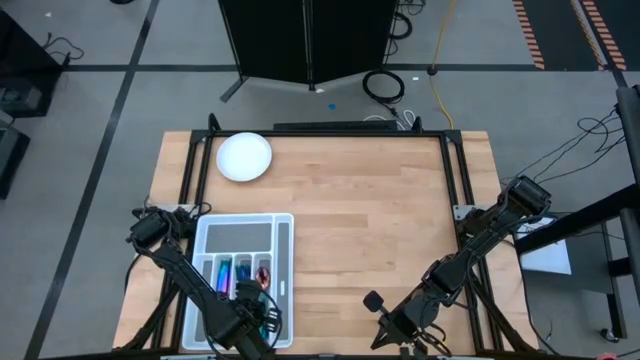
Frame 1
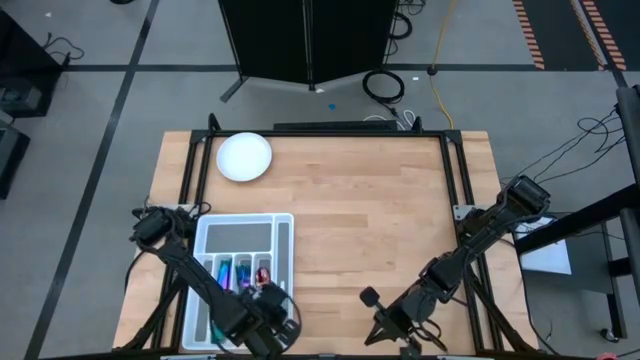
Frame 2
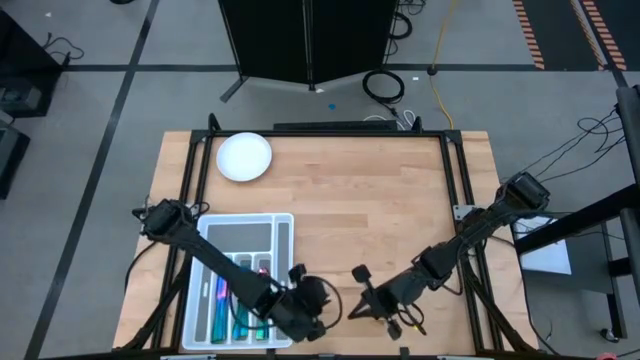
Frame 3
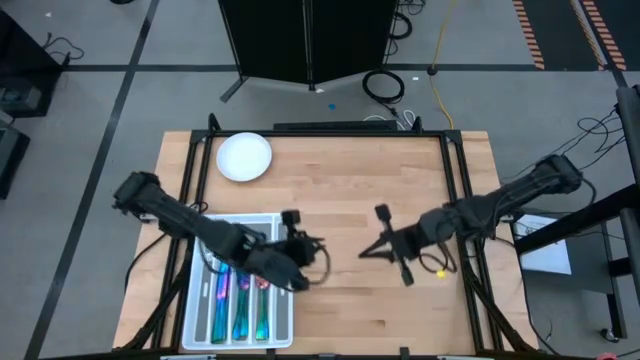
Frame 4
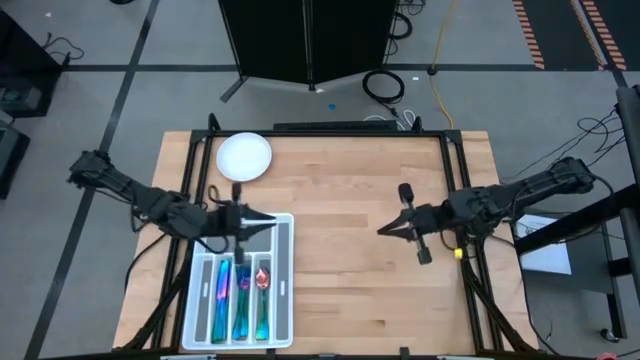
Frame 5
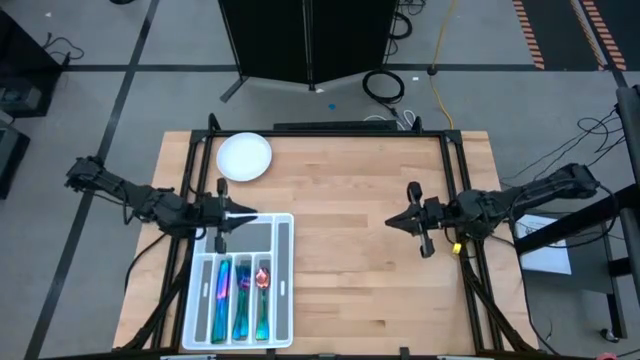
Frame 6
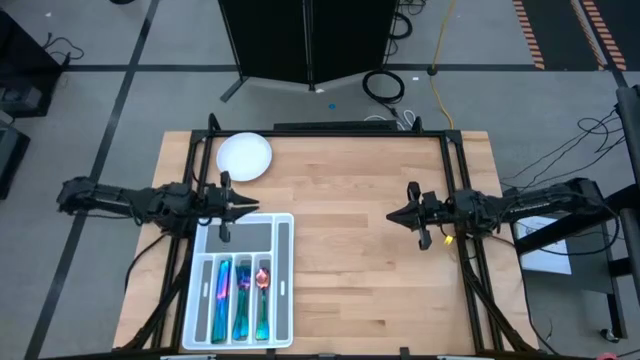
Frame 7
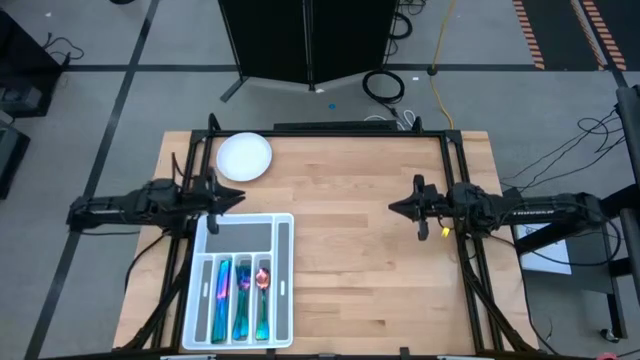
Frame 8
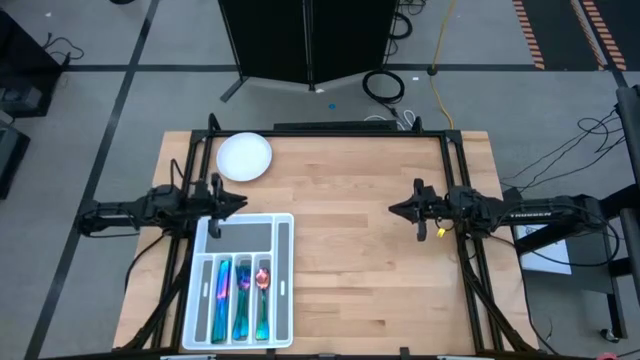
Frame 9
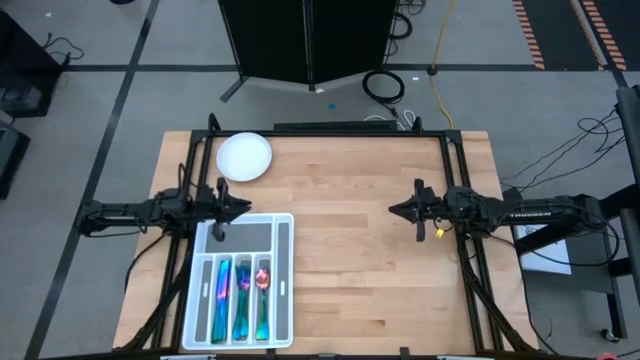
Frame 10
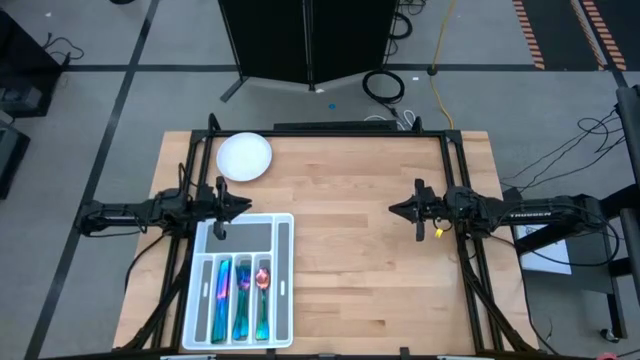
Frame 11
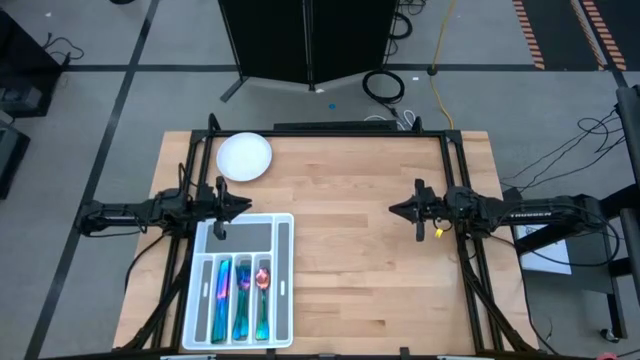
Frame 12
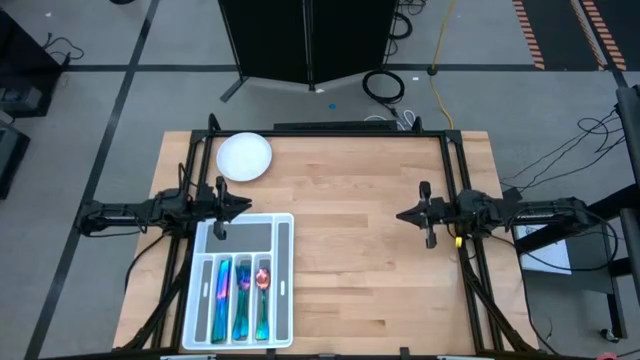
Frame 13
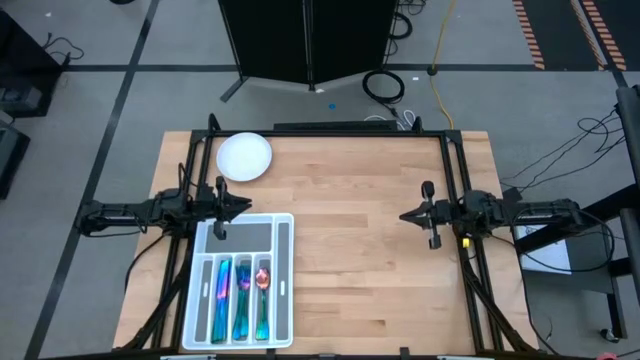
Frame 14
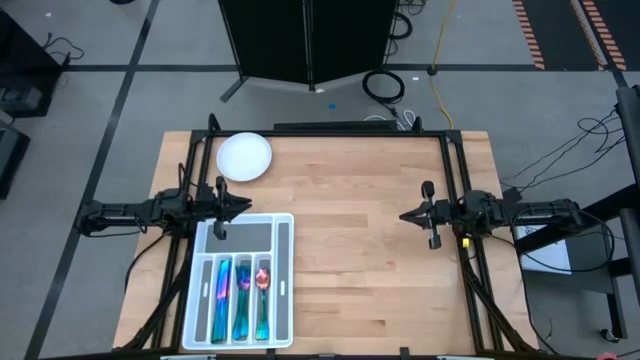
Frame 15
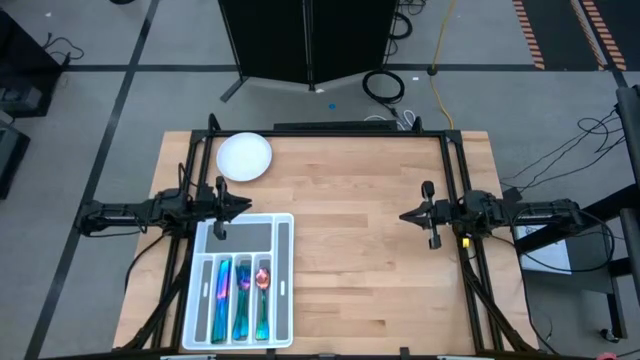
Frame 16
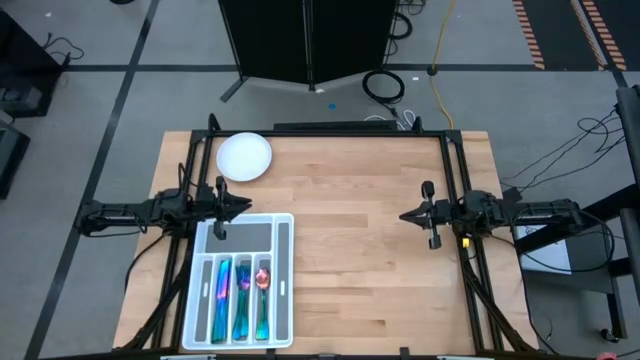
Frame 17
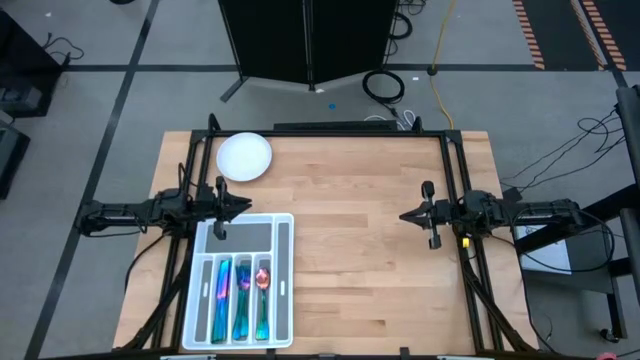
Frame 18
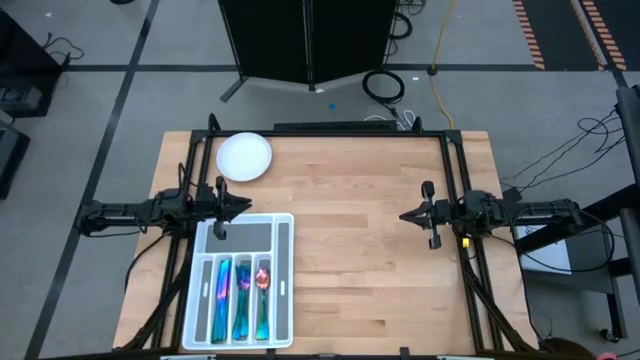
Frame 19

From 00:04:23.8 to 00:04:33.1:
Task: Sort silverware
Return to Home Position

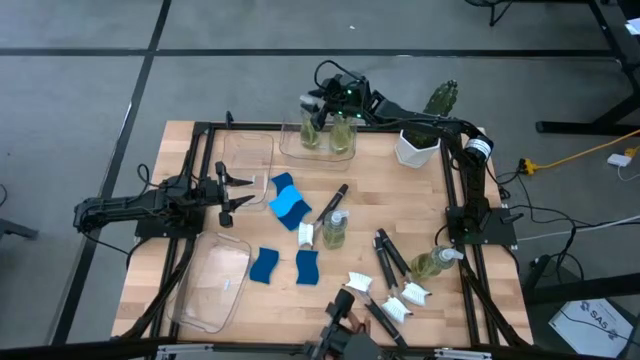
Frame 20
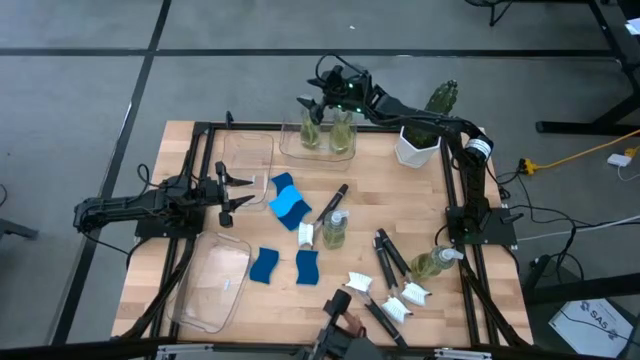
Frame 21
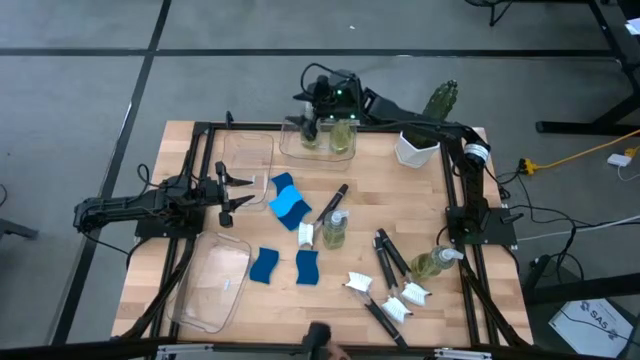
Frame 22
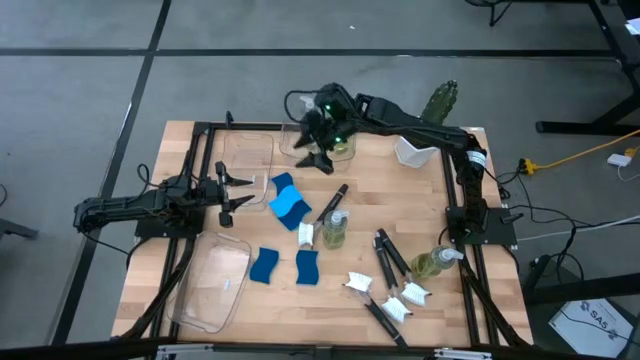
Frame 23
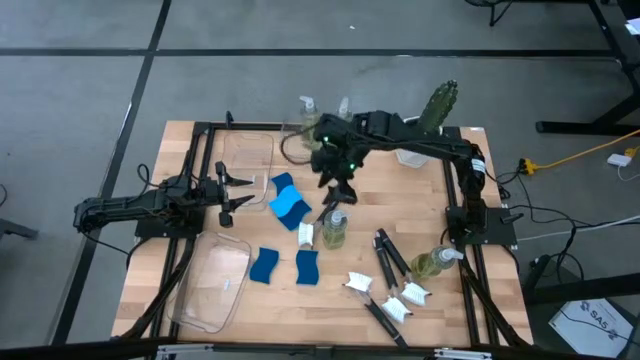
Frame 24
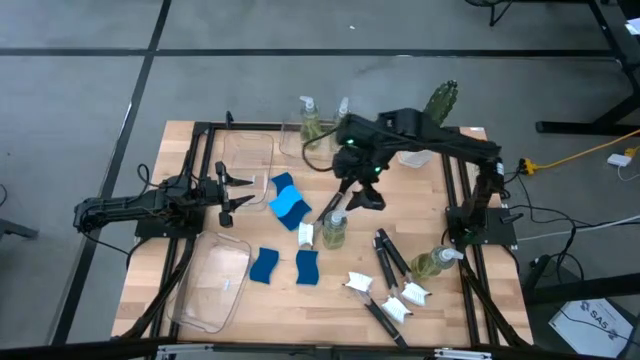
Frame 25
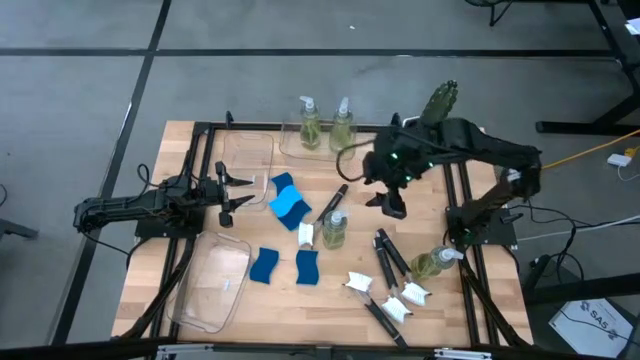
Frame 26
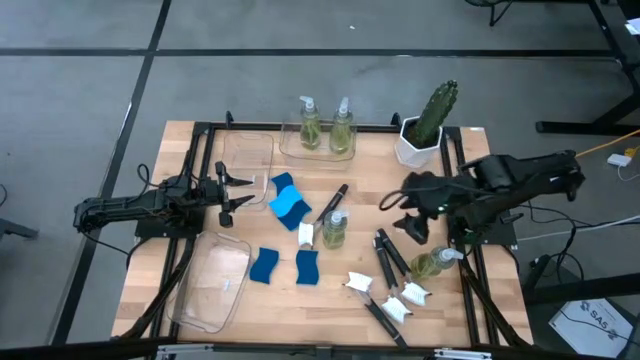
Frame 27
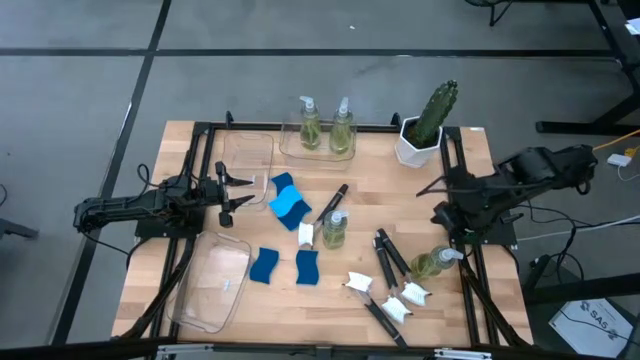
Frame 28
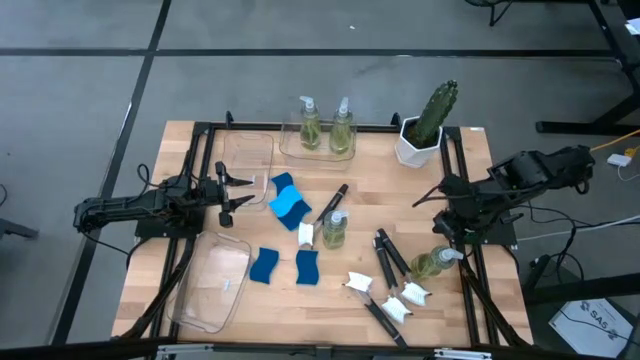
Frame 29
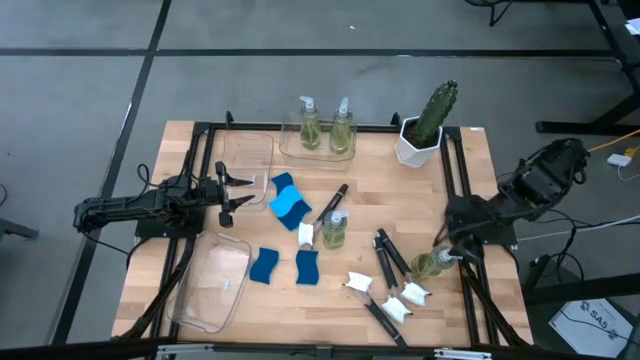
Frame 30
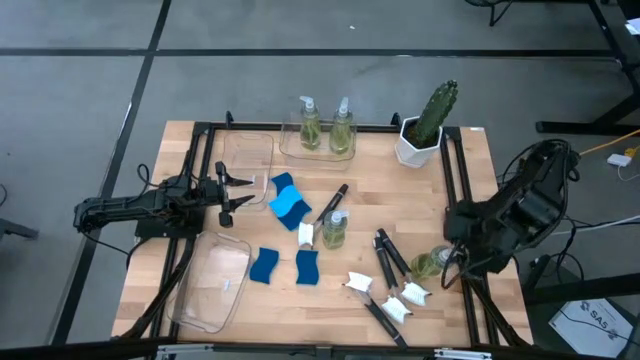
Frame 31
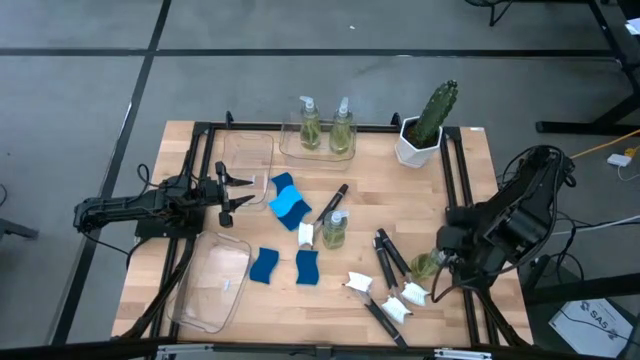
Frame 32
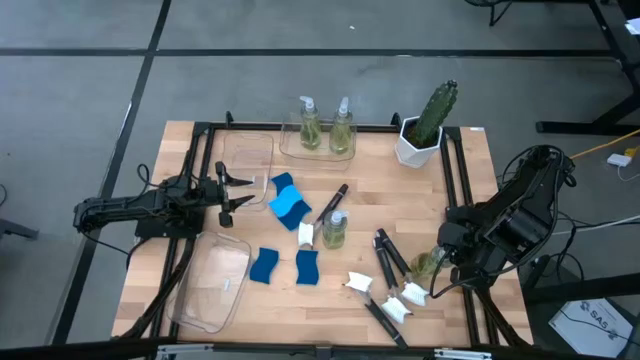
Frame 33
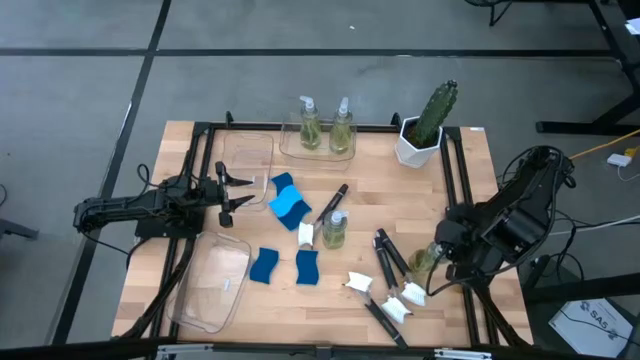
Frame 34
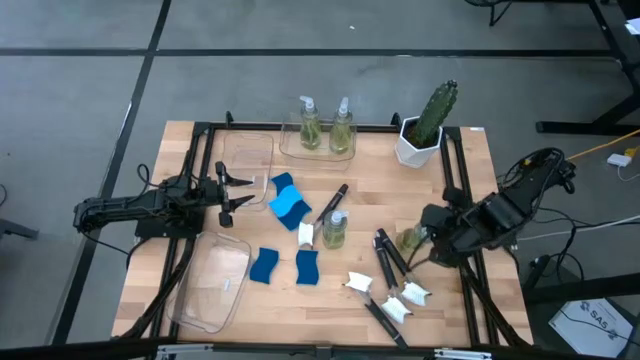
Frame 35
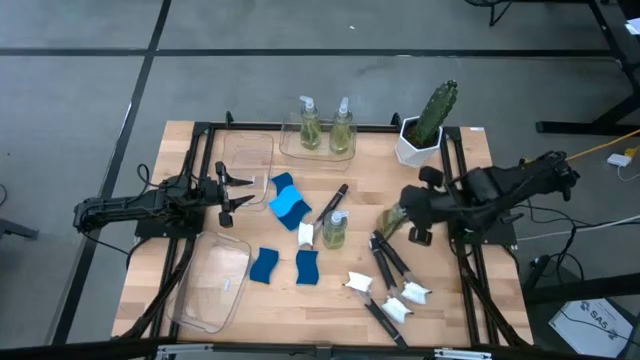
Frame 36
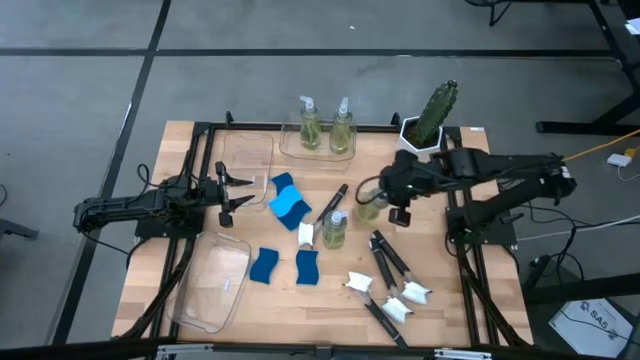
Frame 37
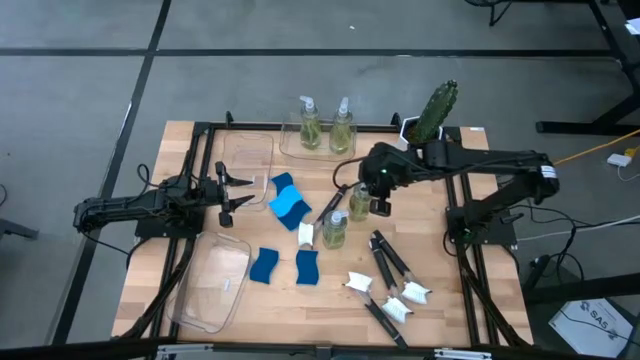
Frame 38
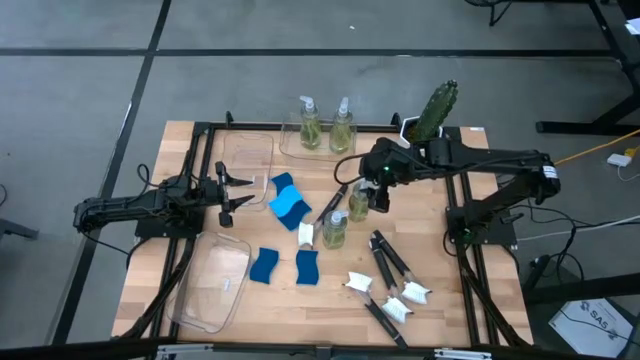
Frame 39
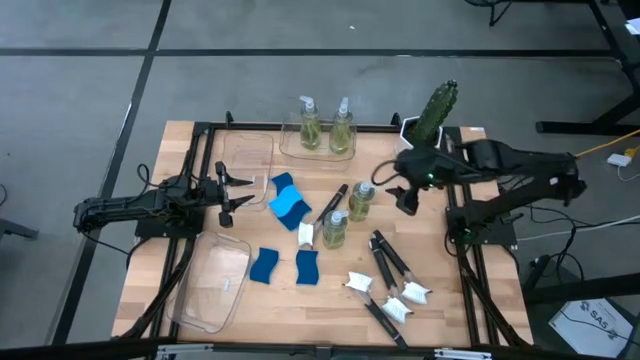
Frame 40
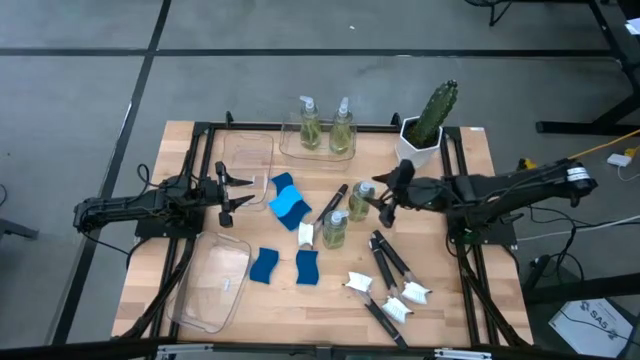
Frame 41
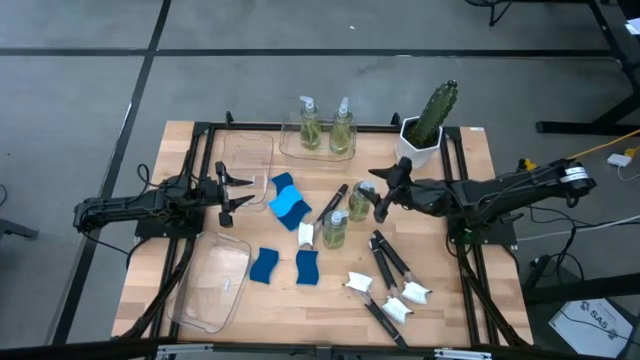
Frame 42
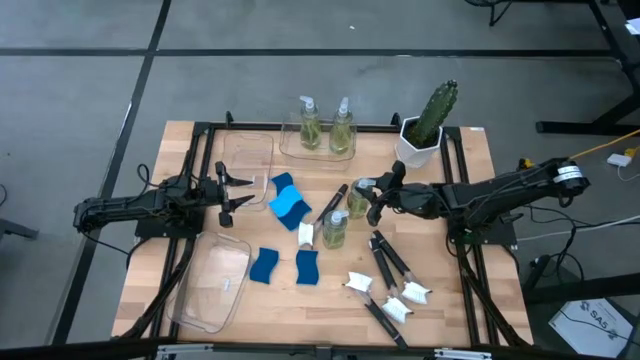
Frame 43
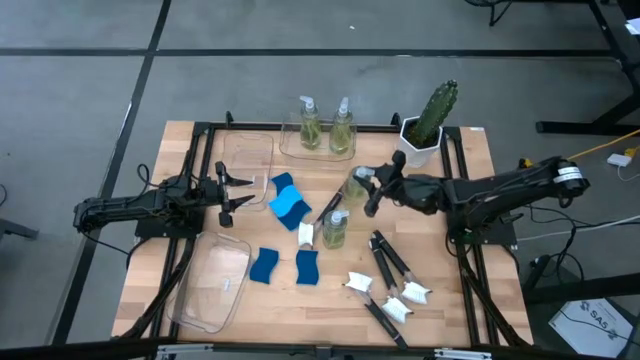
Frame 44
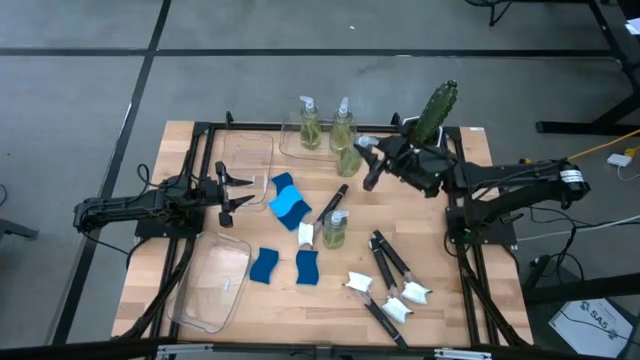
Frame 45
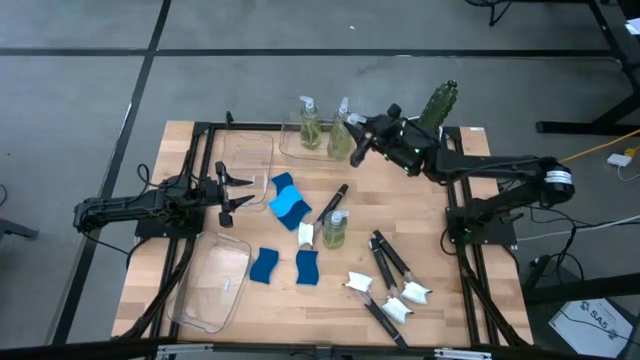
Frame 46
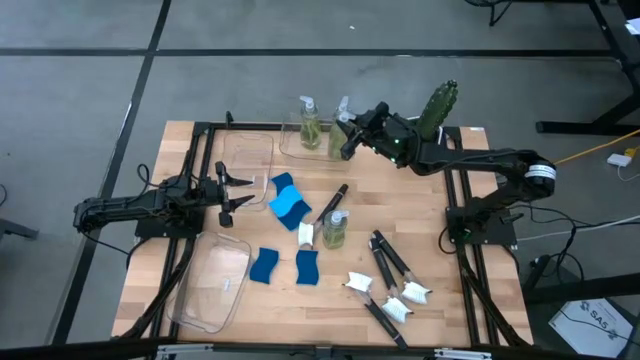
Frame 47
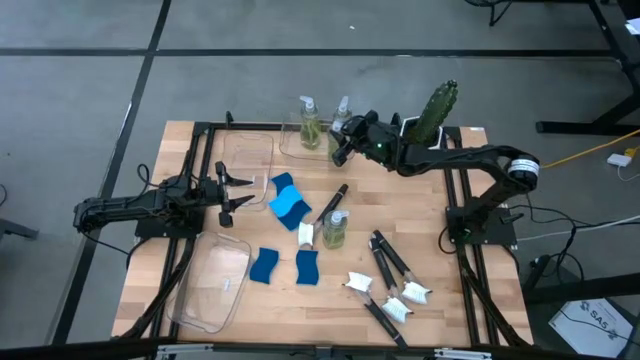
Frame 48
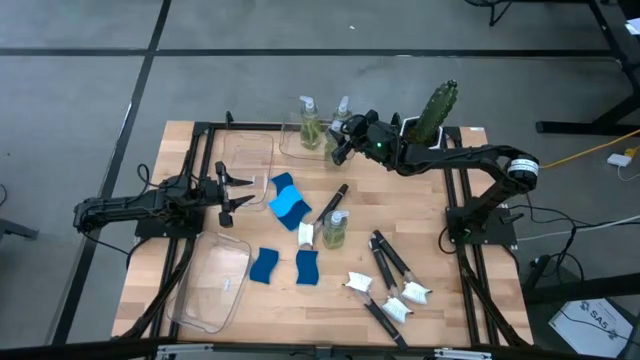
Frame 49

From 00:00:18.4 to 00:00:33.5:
Task: Pick & Place Kitchen Sink Supplies
Put the yellow soap dispenser bottle into the top right transparent bin
